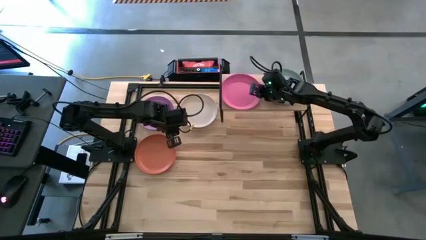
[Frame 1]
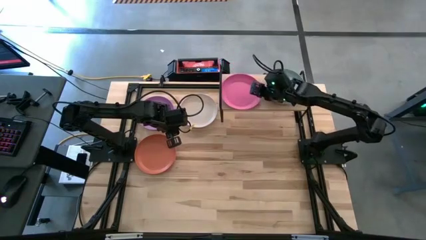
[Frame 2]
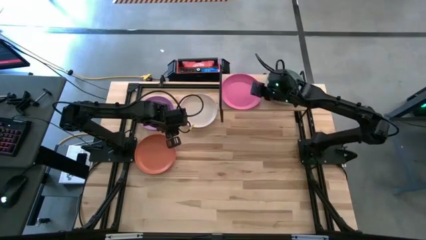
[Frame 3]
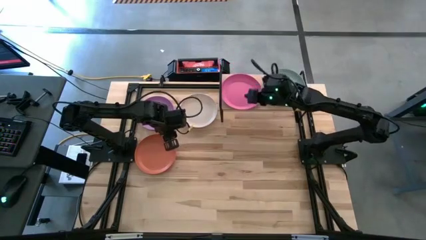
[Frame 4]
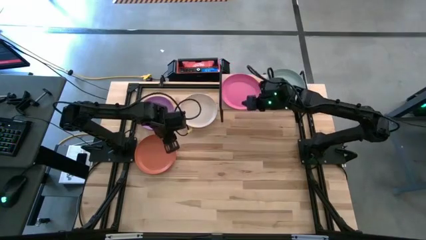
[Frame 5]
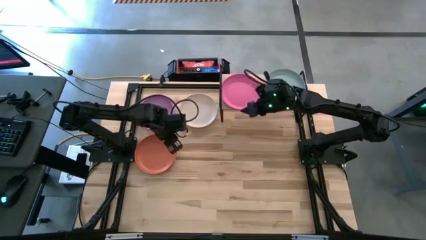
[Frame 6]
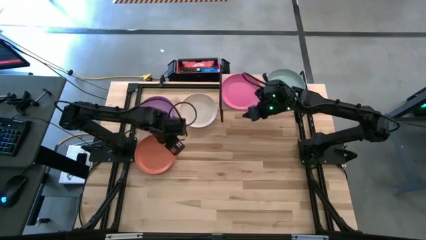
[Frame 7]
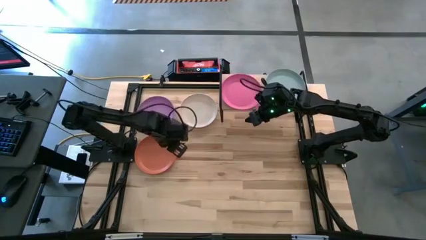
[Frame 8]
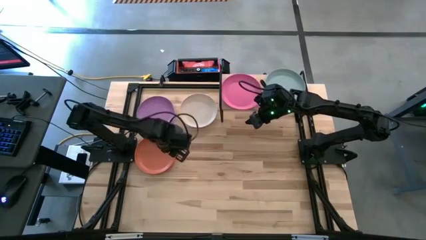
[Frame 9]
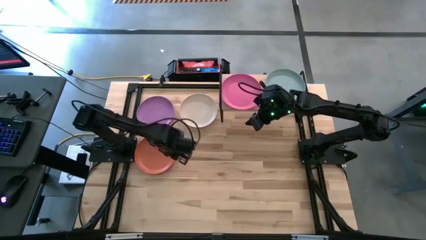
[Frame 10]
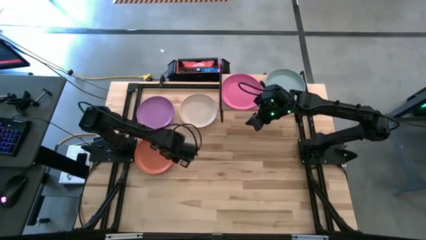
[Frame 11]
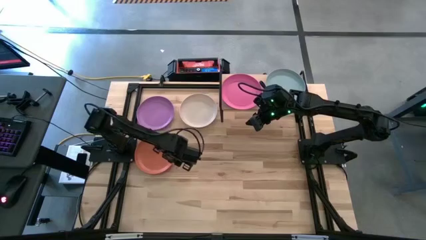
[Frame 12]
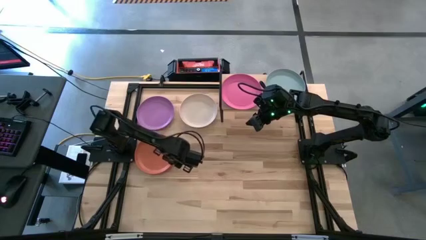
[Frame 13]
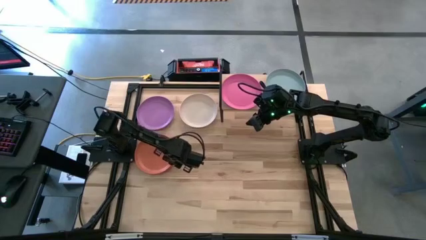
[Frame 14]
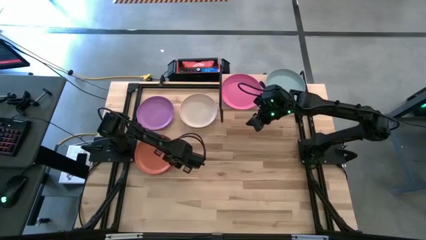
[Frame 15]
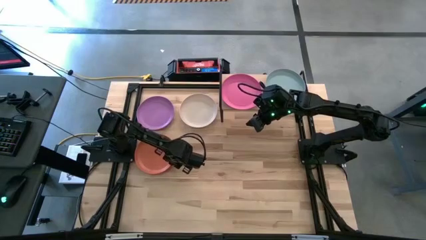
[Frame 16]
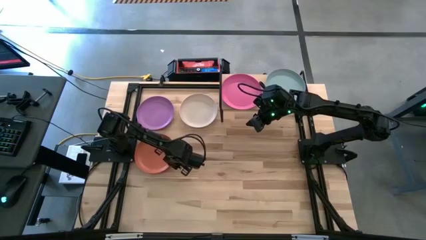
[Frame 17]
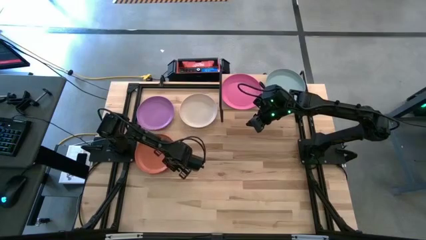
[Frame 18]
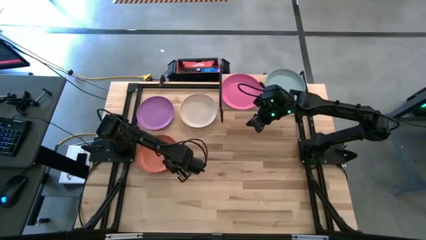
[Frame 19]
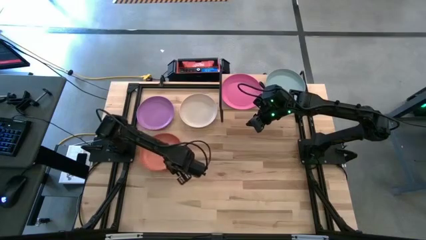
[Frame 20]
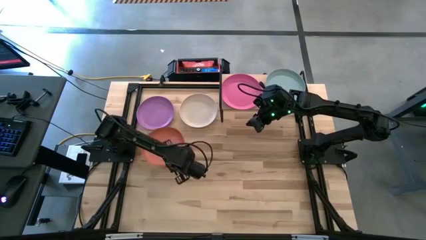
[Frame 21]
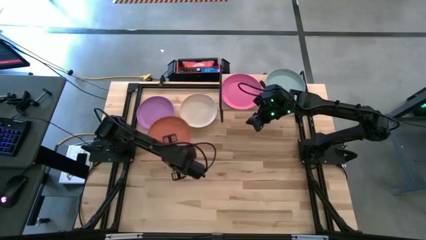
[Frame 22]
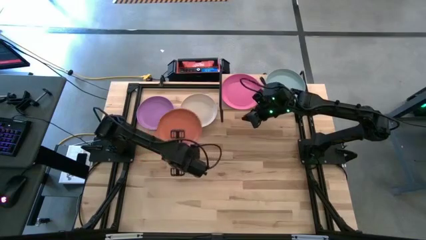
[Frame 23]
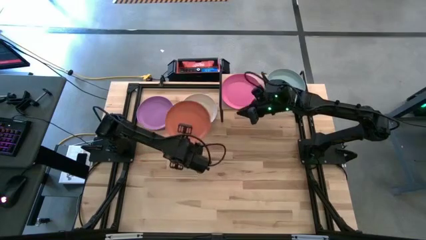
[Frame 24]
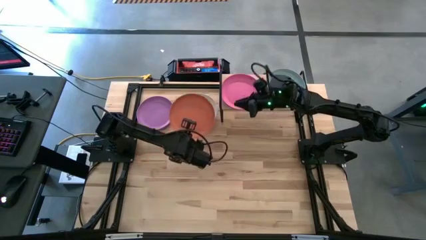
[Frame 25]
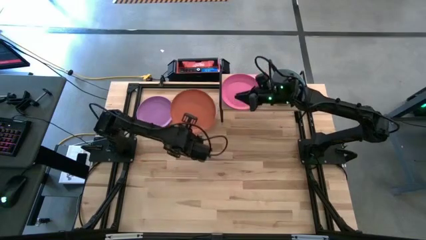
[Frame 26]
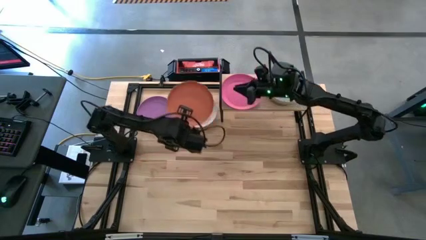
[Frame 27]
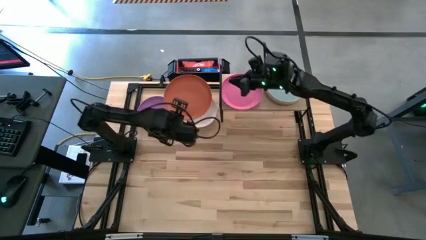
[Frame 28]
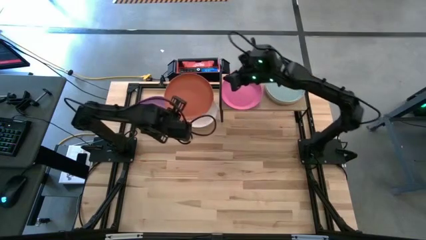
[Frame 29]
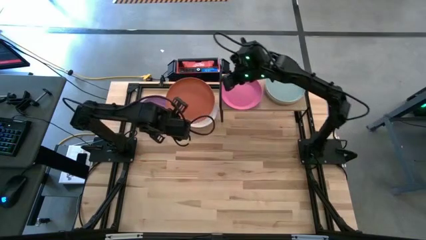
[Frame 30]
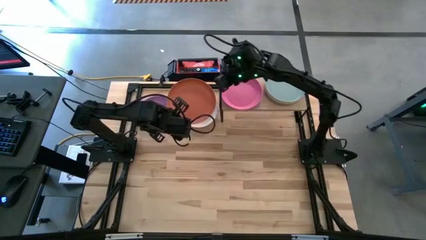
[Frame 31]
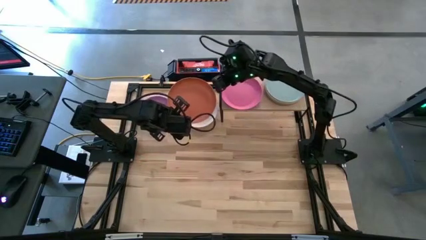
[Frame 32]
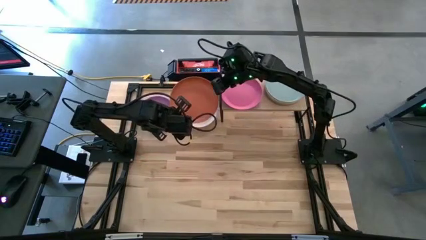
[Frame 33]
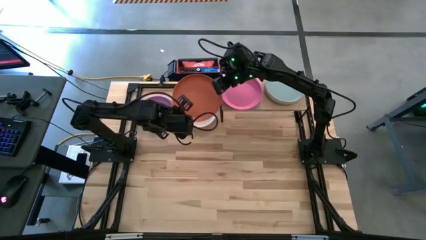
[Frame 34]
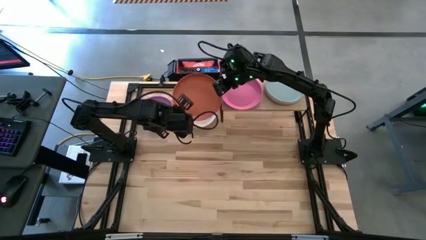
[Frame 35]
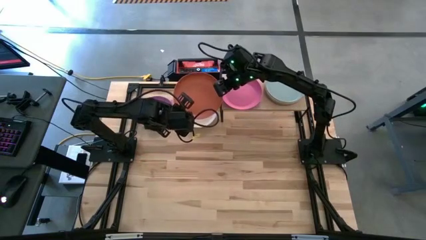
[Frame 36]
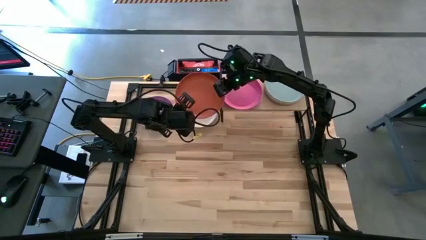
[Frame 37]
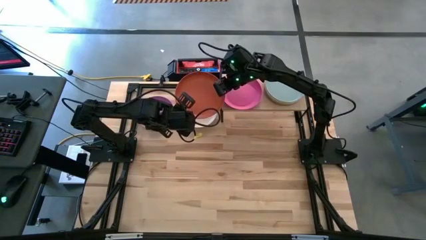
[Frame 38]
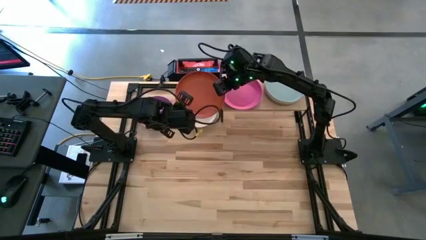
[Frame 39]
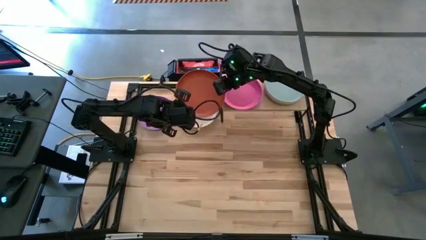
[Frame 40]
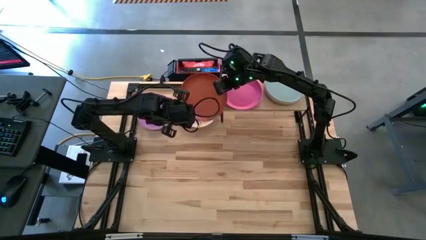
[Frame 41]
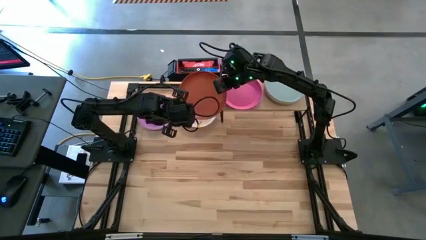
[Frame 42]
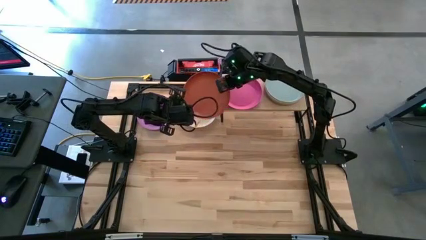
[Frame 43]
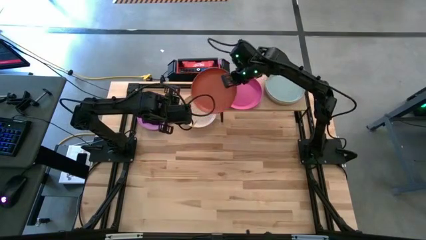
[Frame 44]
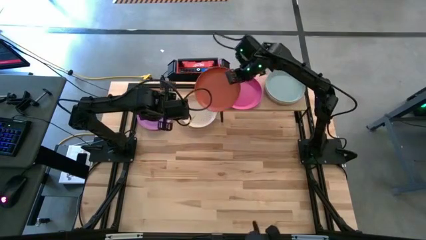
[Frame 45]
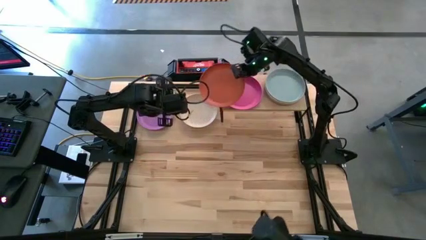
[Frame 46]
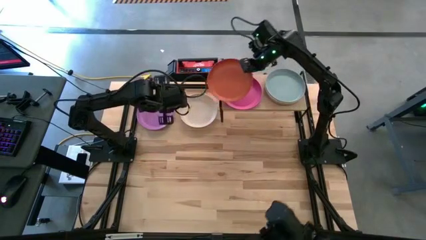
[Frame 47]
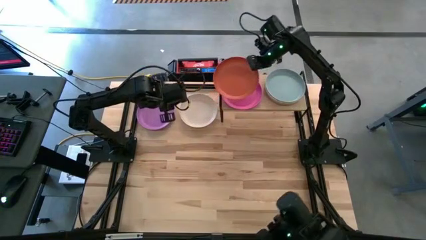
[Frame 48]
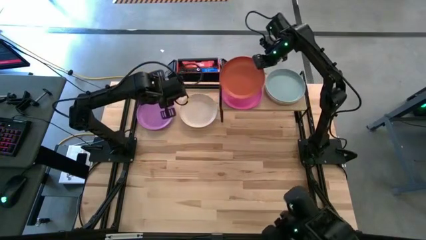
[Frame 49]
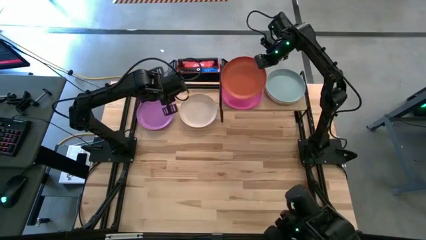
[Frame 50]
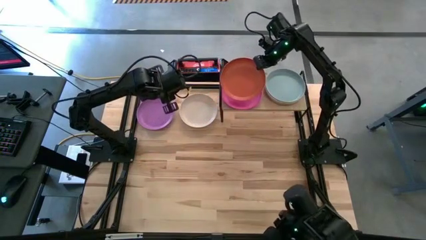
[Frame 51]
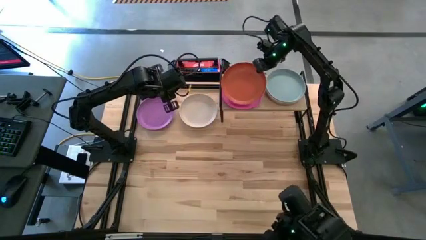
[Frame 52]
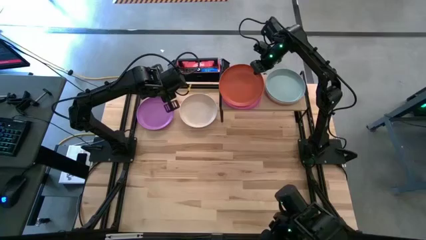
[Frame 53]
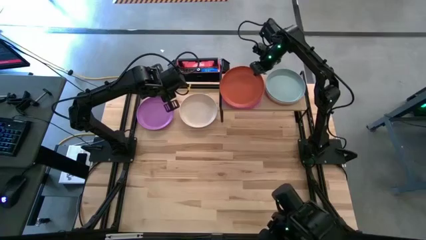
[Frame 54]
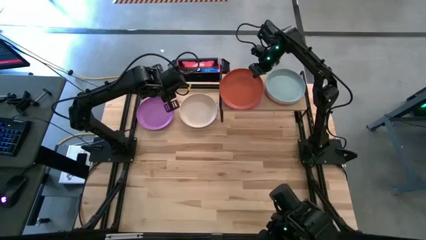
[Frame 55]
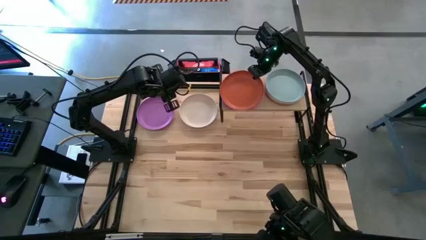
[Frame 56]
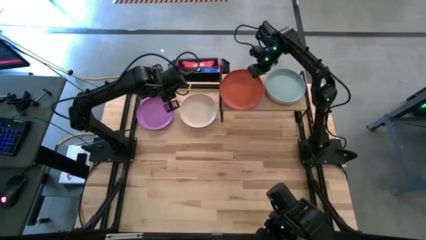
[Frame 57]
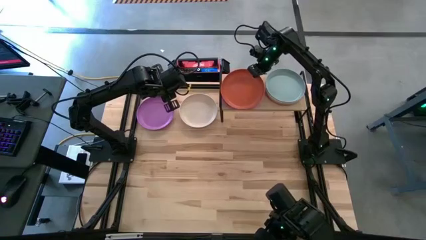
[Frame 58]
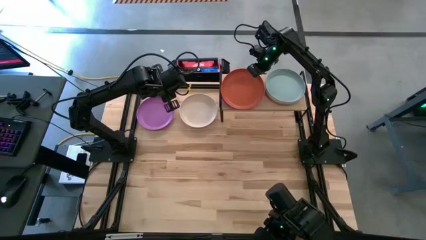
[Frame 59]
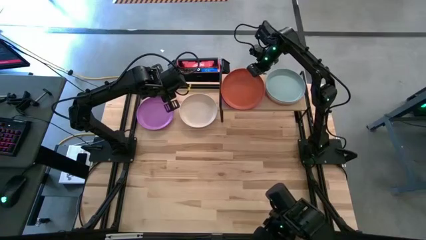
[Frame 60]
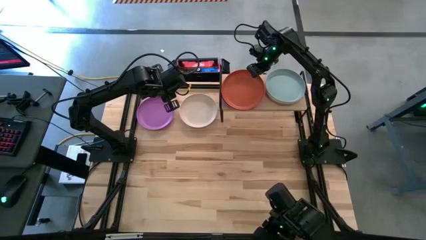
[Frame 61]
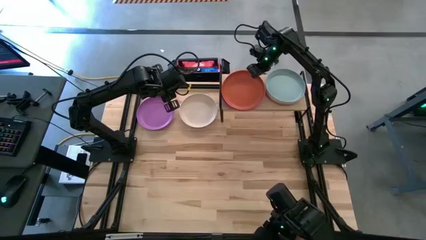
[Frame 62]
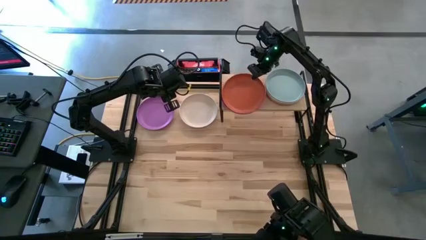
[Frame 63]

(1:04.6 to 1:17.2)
Task: Place and stack plates onto a shelf
Stack the orange plate on top of the pink plate on the shelf
